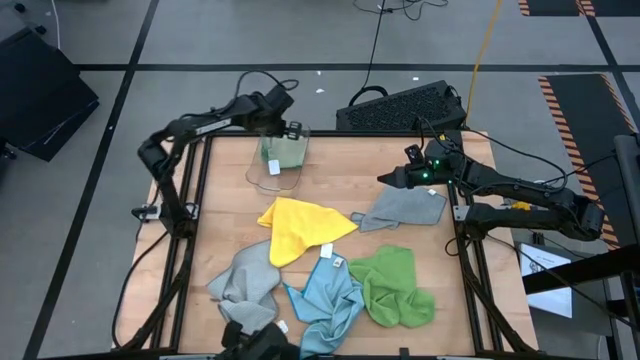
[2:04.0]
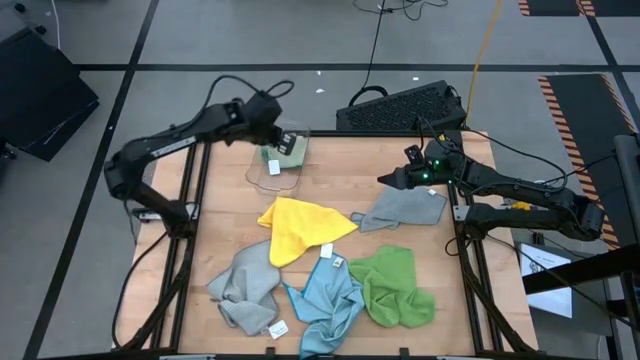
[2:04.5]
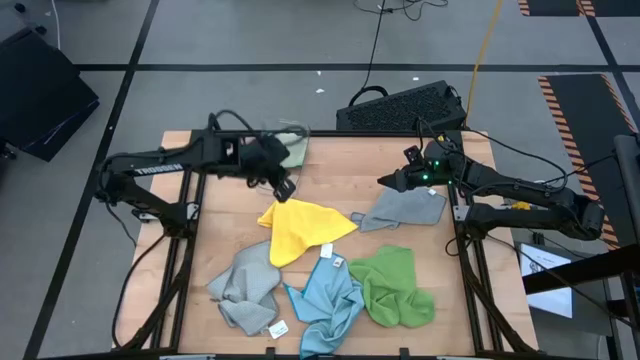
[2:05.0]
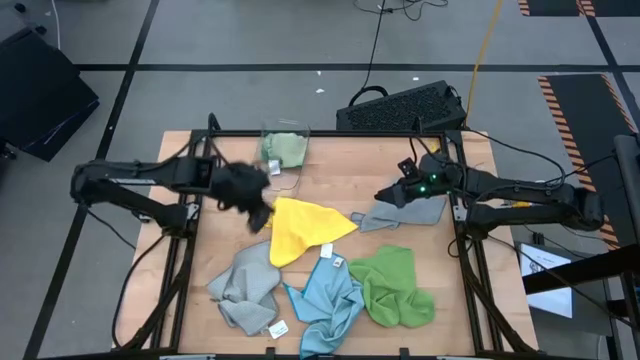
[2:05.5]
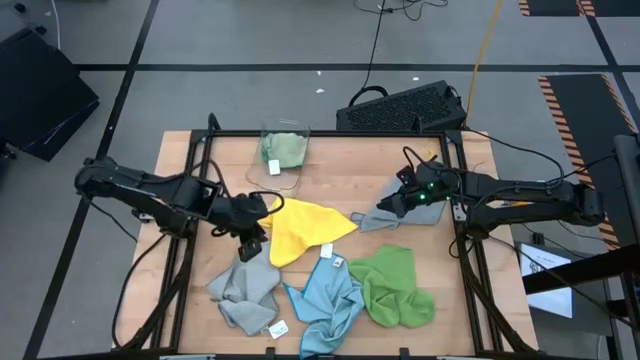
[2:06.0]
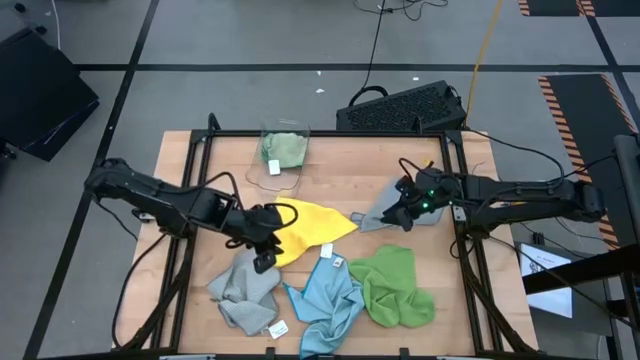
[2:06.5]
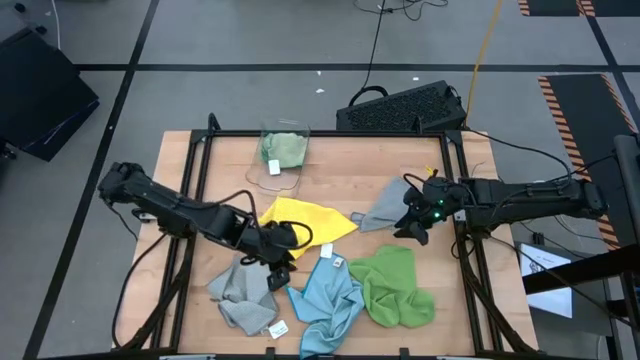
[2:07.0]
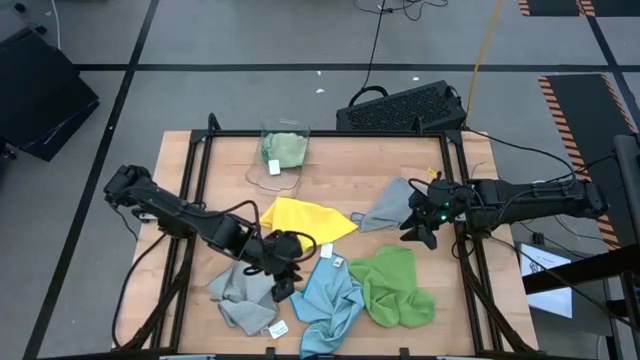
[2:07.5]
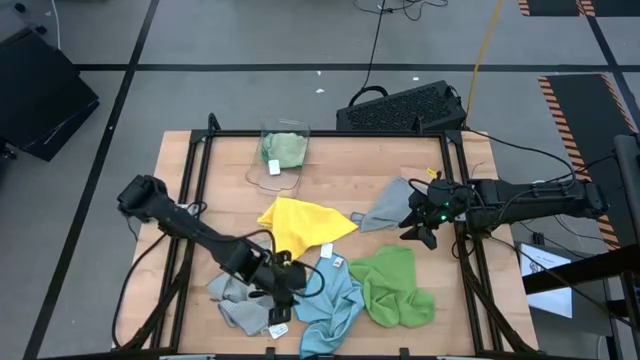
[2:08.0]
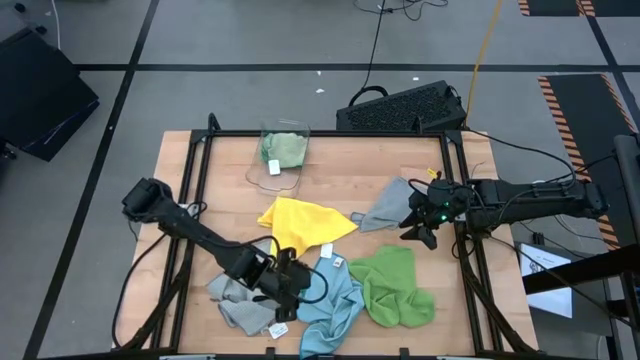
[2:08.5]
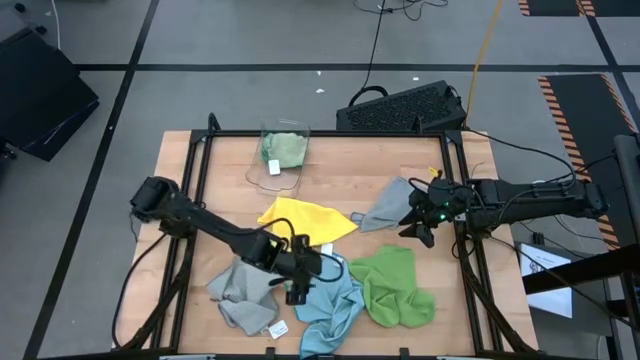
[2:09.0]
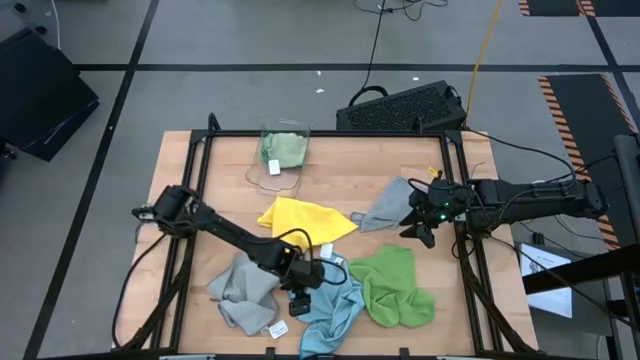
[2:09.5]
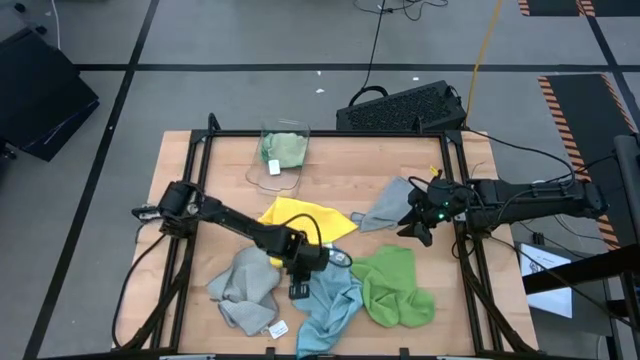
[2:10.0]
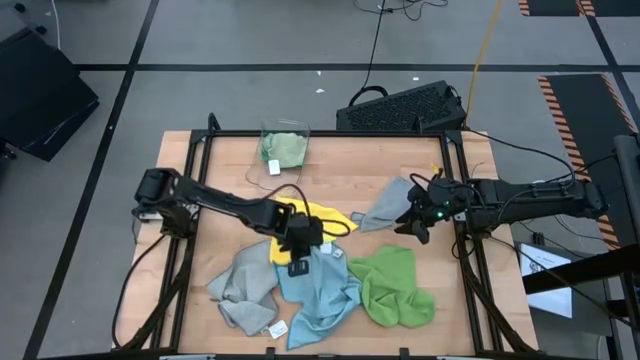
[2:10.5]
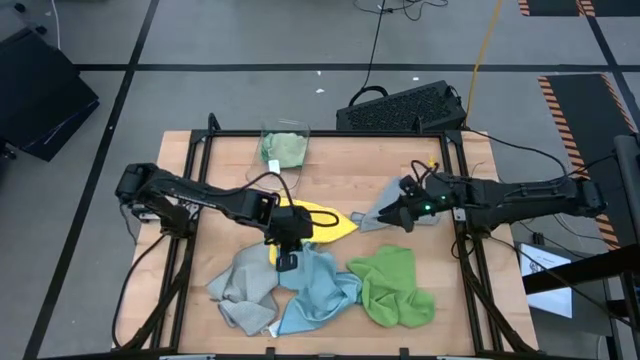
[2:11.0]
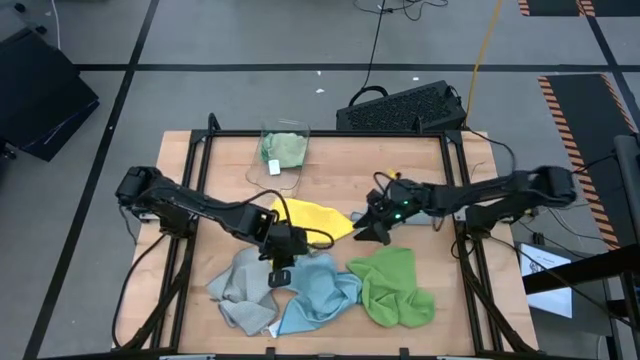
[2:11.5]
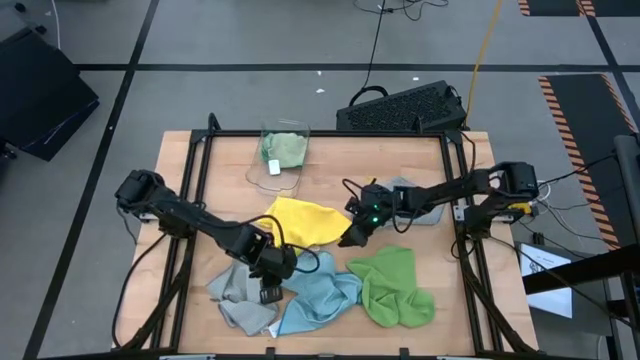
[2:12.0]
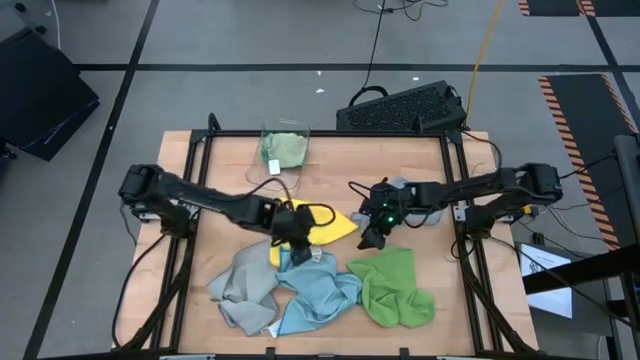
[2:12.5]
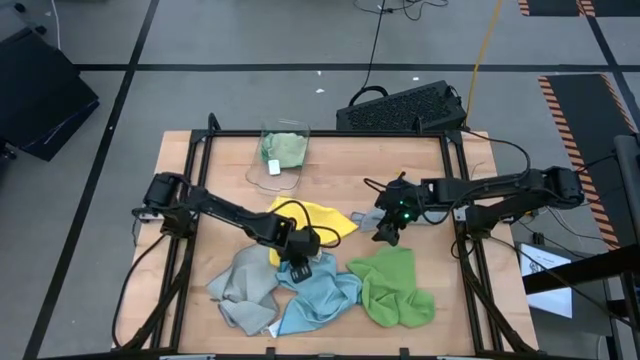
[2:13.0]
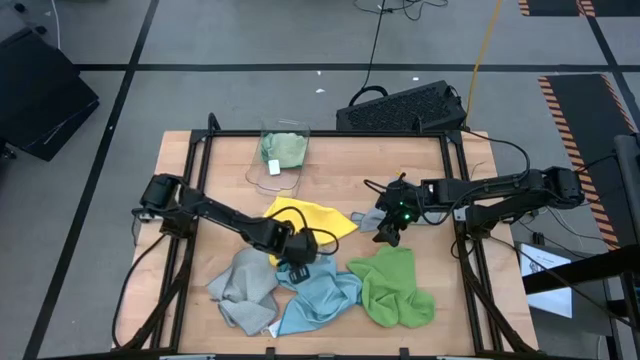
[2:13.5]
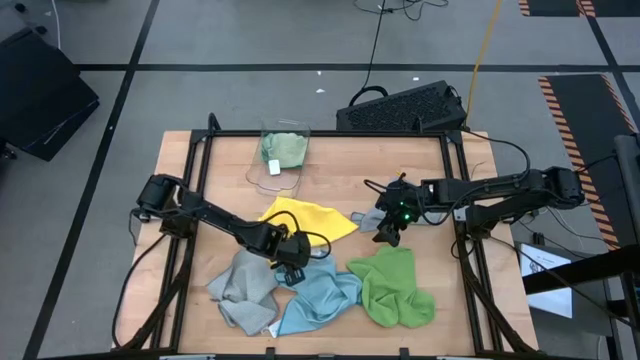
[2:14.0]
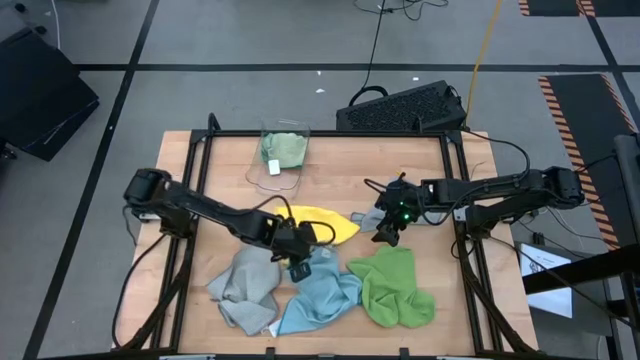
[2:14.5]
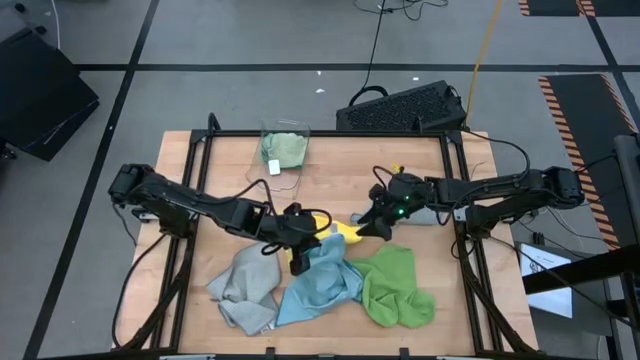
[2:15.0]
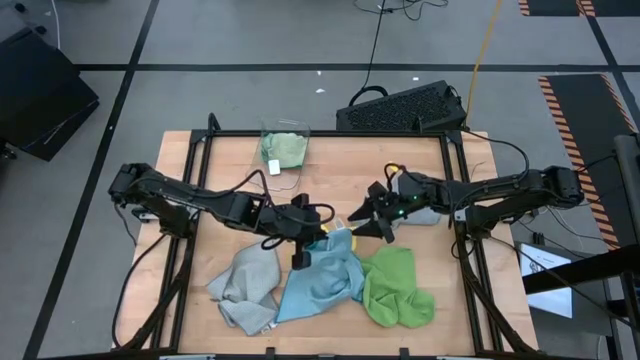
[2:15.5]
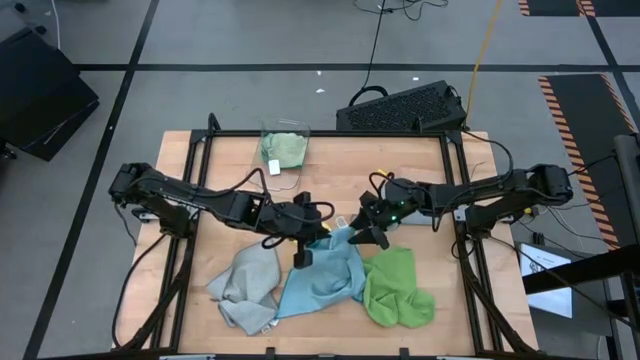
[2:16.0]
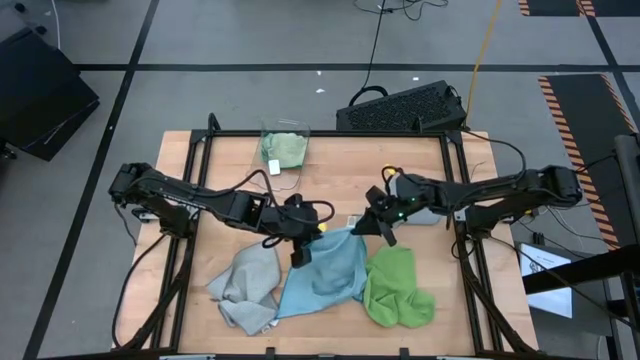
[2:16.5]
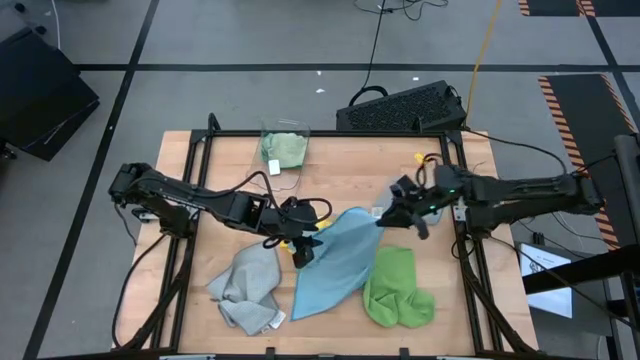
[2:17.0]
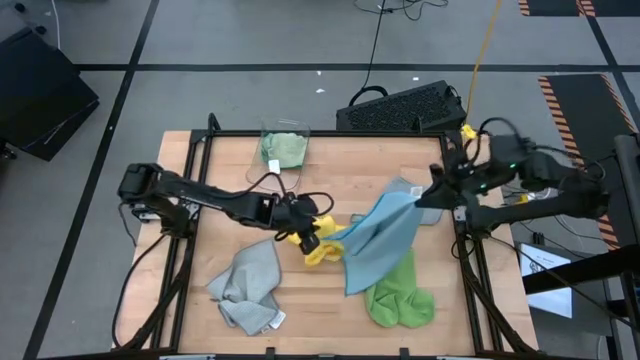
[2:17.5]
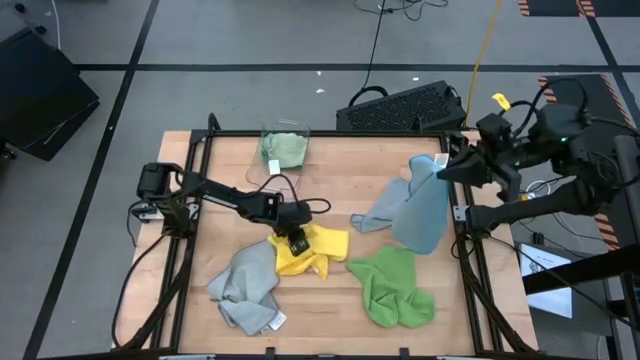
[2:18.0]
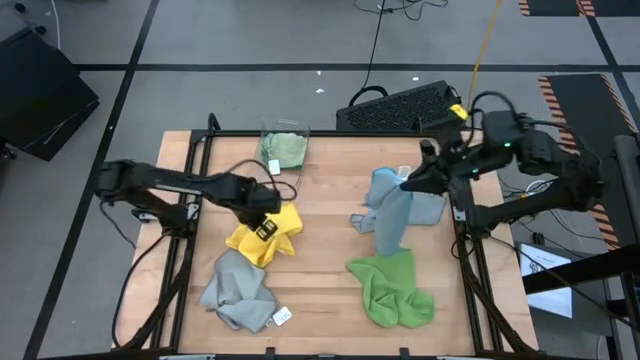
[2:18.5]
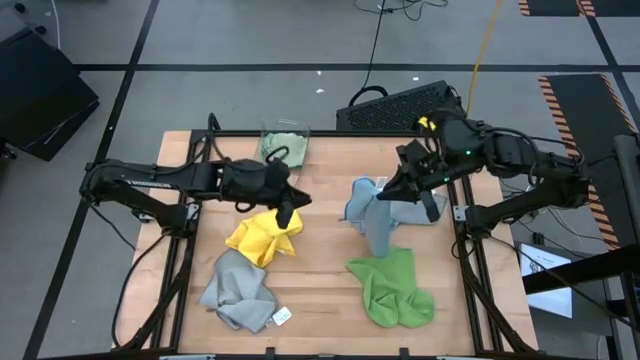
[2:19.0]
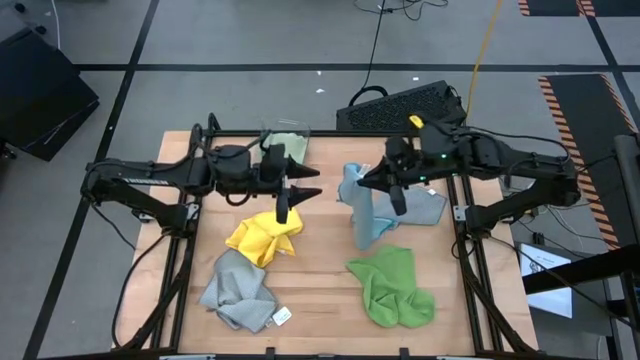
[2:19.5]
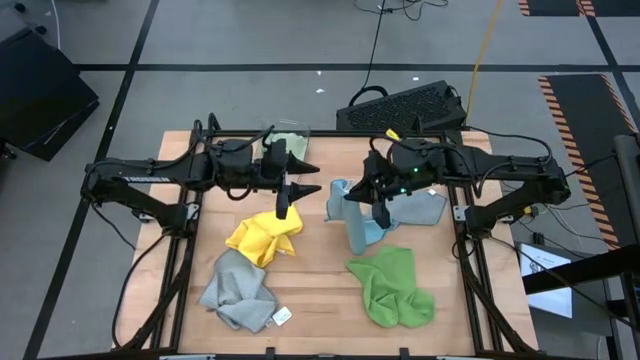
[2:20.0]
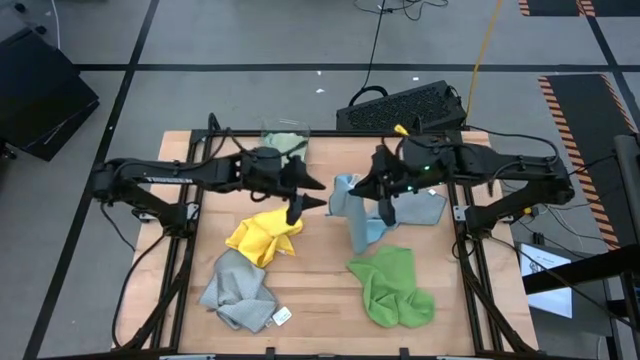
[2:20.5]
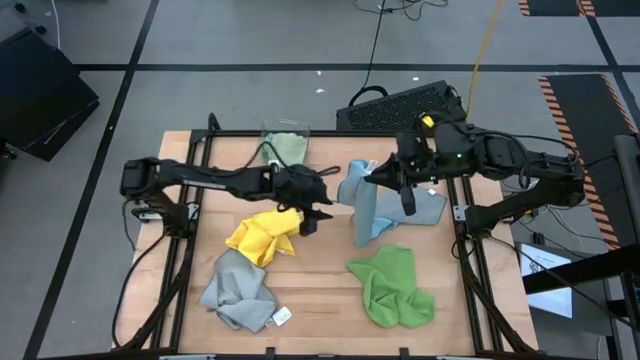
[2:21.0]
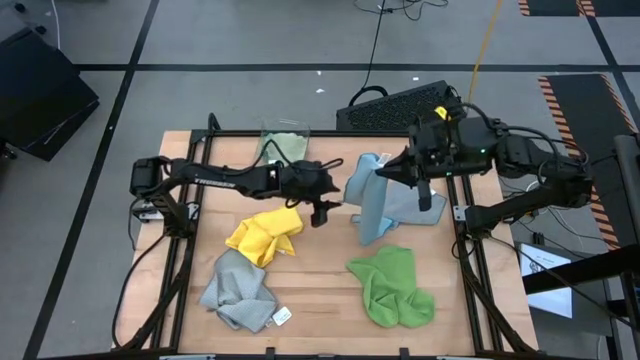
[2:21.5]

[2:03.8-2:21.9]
Task: Fold microfiber towels
Fold the blue microfiber cloth

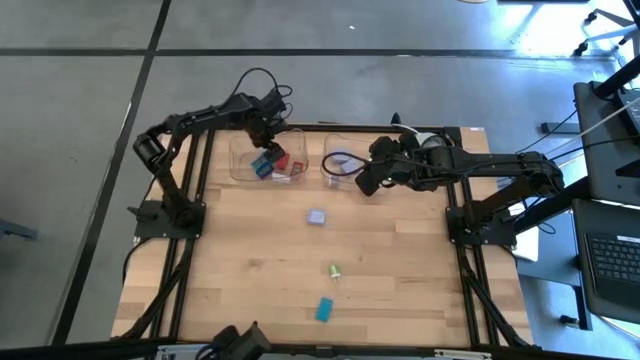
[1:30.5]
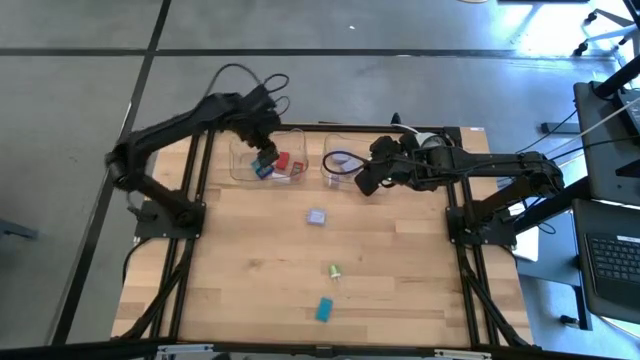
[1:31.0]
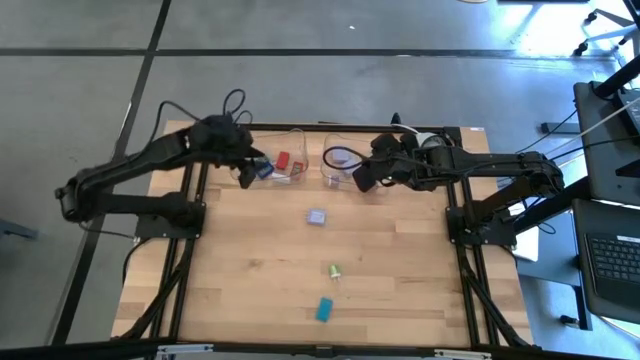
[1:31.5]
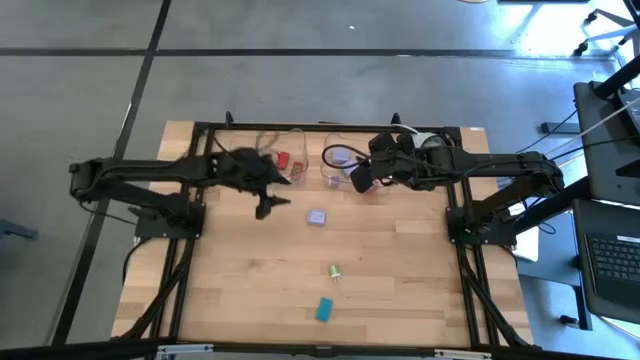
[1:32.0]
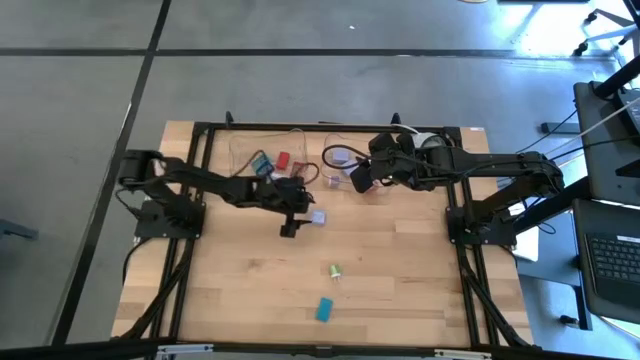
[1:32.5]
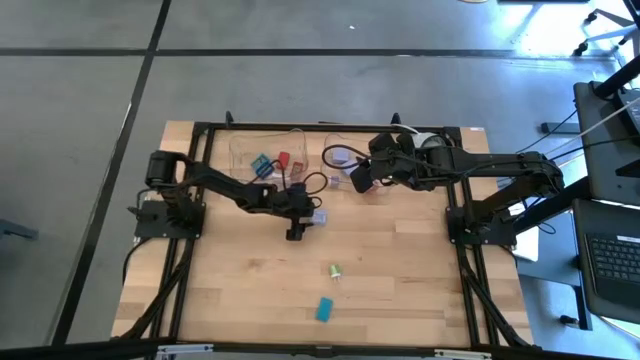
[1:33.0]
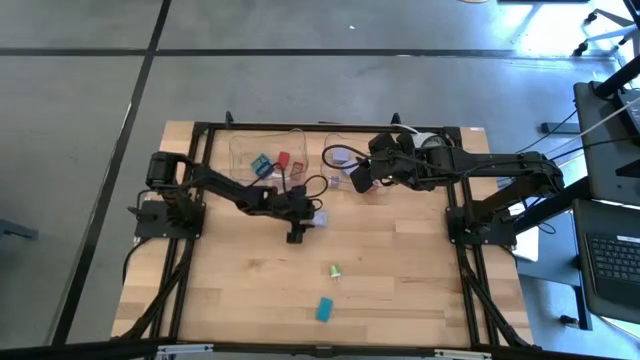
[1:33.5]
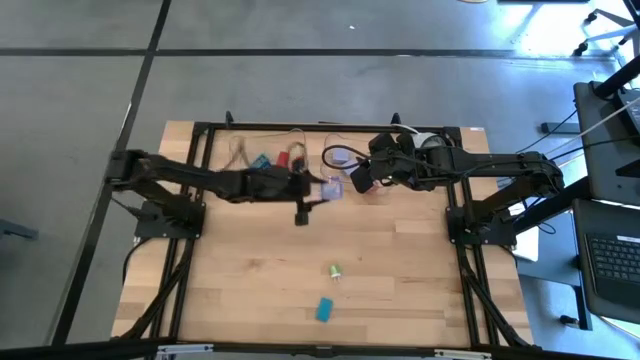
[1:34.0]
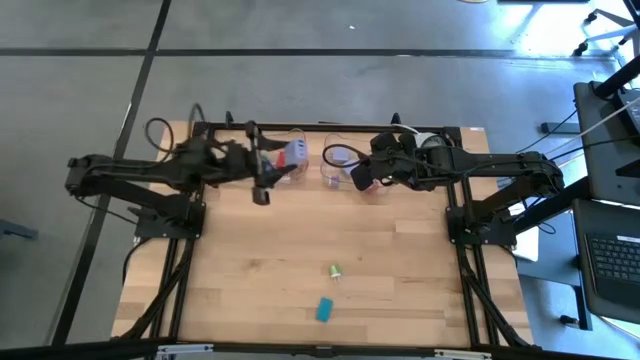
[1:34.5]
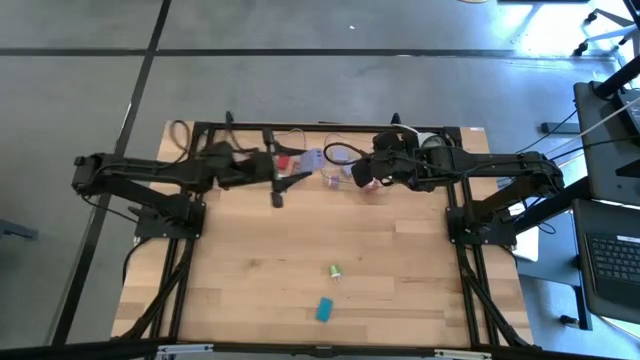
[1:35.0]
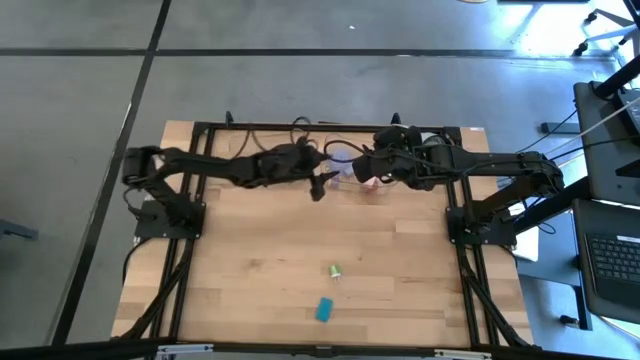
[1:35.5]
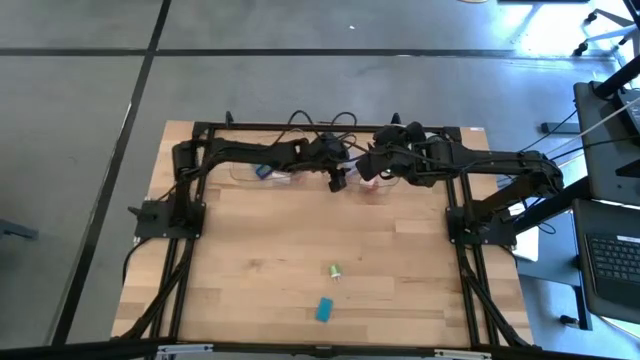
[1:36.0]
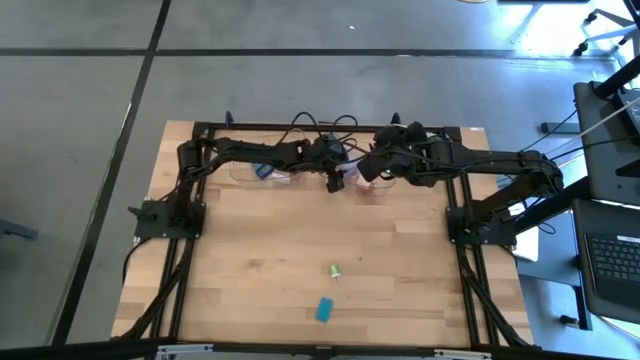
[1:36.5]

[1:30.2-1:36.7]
Task: Pick & Place Office items
Put the purple charger adapter into the right transparent bin
